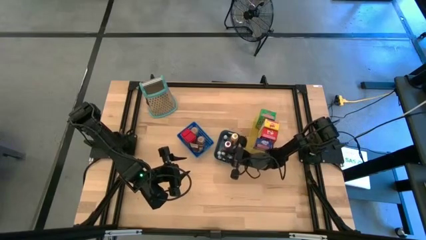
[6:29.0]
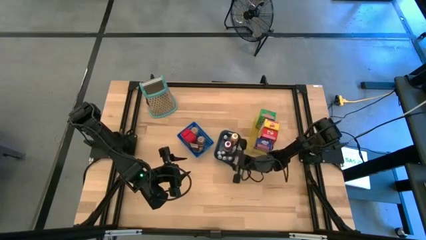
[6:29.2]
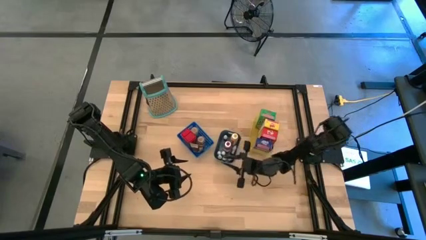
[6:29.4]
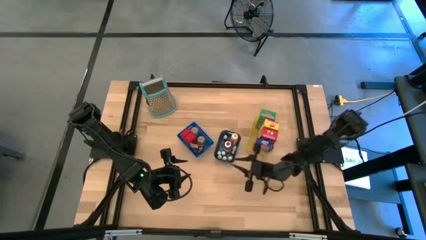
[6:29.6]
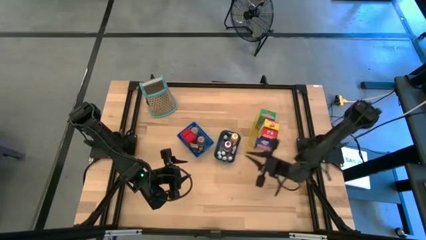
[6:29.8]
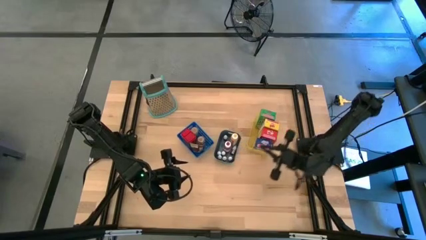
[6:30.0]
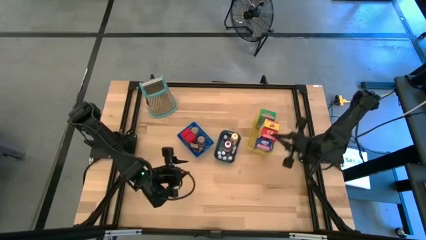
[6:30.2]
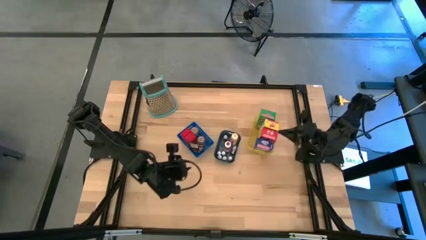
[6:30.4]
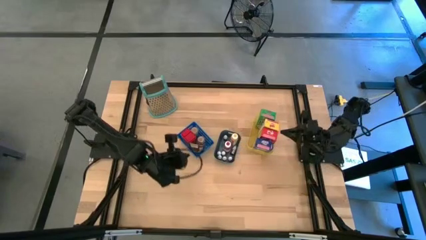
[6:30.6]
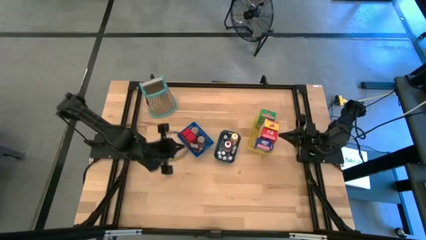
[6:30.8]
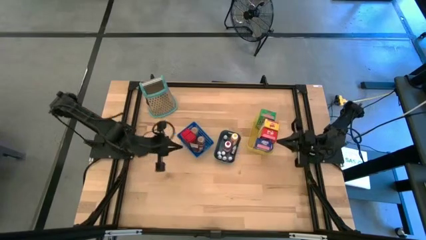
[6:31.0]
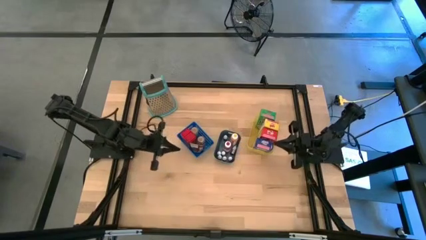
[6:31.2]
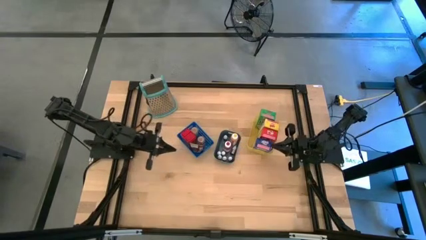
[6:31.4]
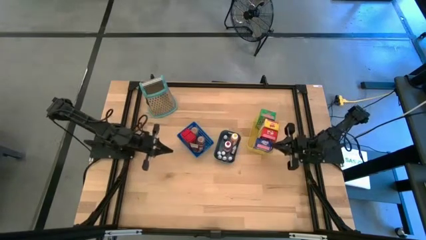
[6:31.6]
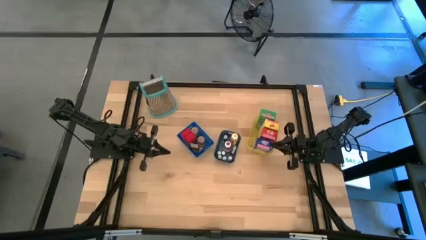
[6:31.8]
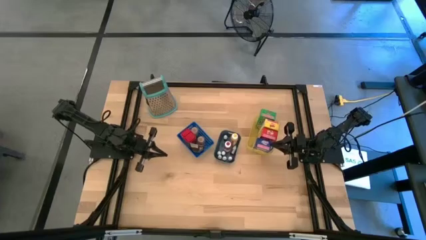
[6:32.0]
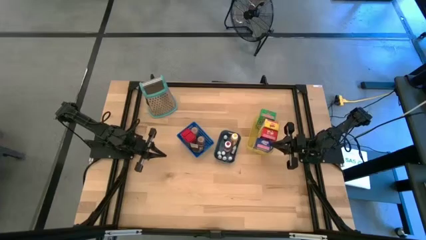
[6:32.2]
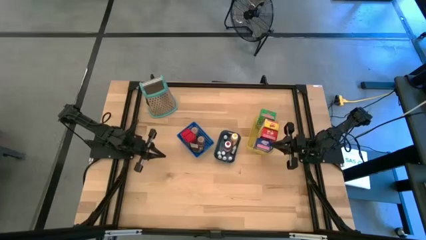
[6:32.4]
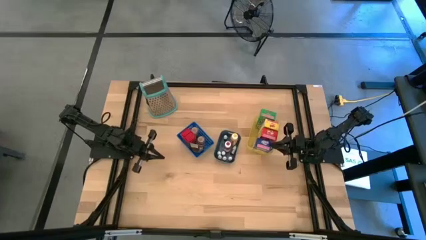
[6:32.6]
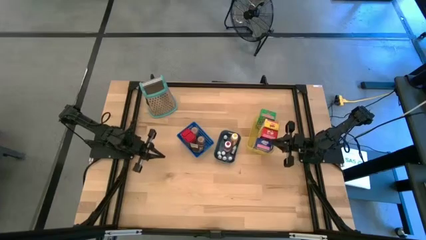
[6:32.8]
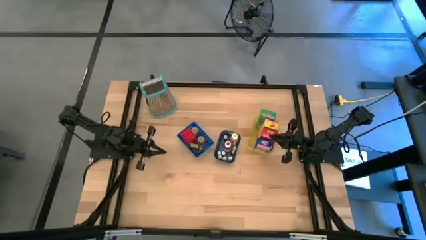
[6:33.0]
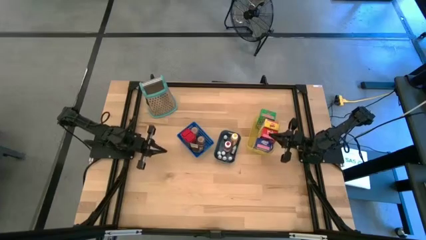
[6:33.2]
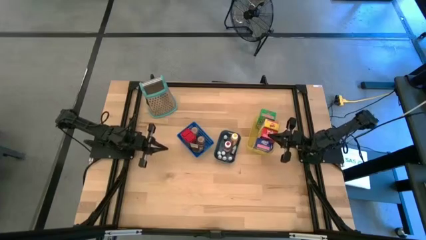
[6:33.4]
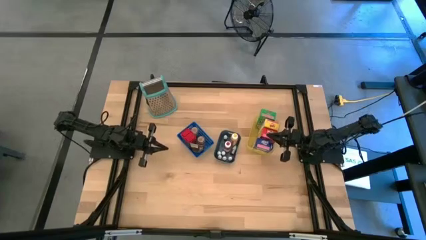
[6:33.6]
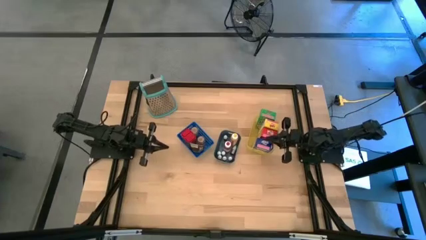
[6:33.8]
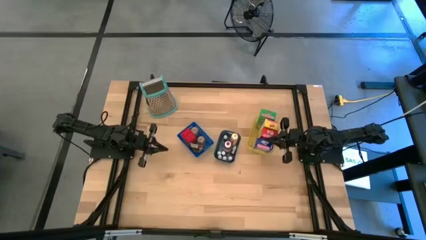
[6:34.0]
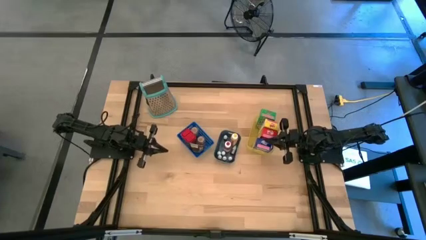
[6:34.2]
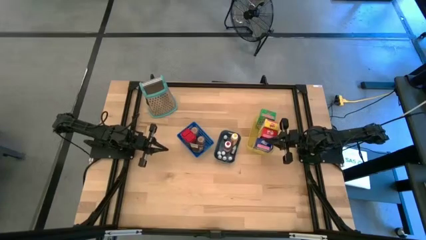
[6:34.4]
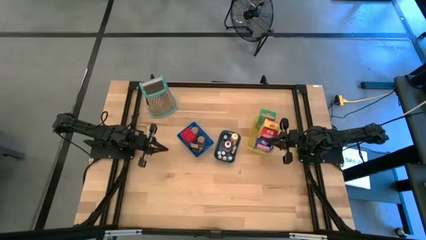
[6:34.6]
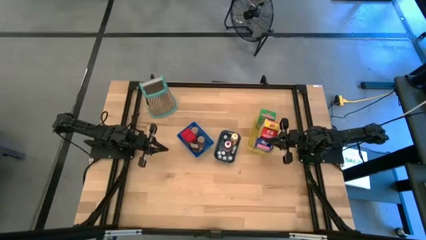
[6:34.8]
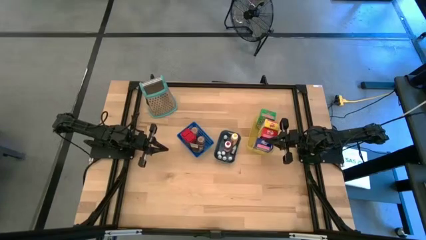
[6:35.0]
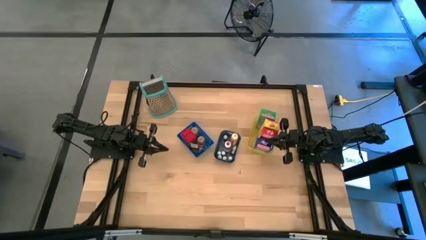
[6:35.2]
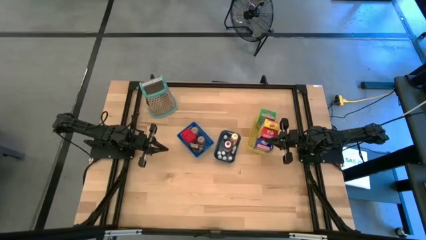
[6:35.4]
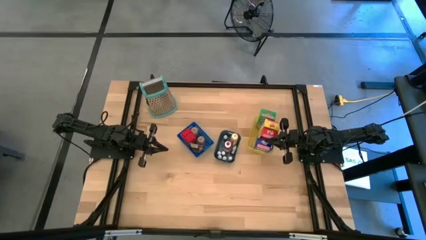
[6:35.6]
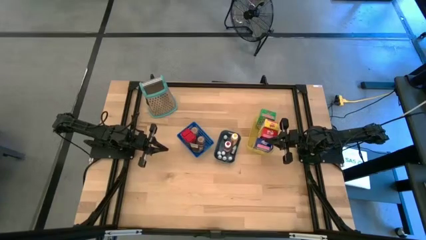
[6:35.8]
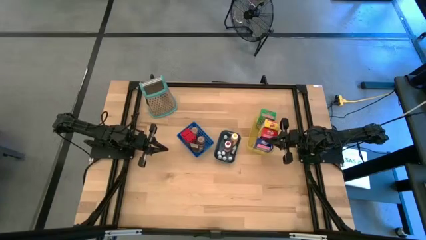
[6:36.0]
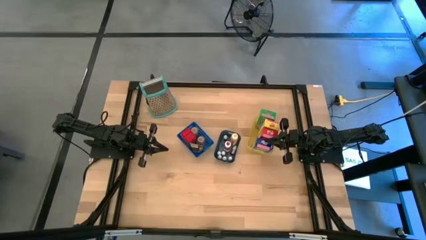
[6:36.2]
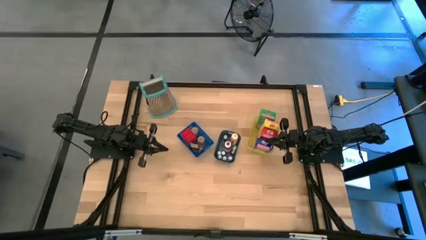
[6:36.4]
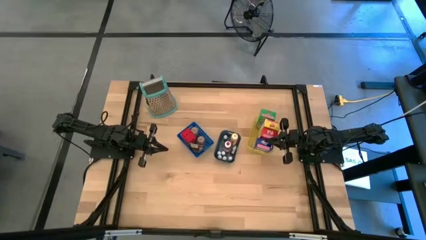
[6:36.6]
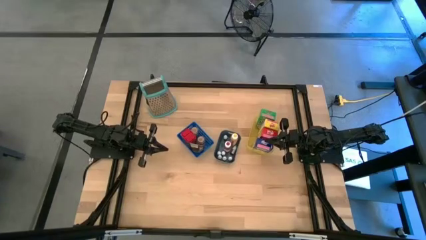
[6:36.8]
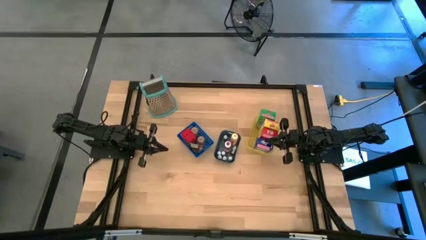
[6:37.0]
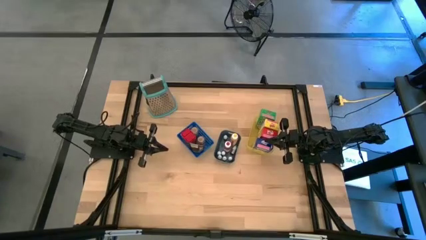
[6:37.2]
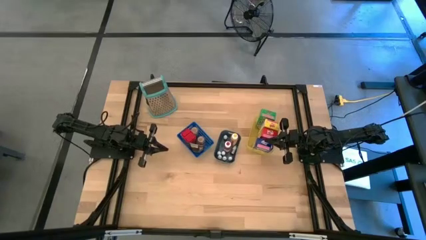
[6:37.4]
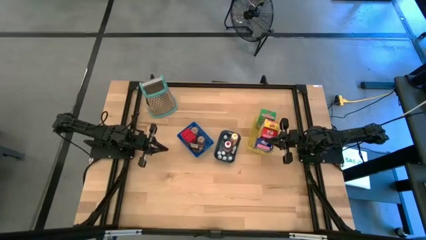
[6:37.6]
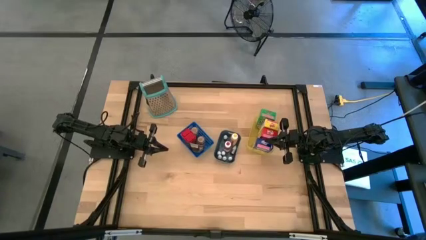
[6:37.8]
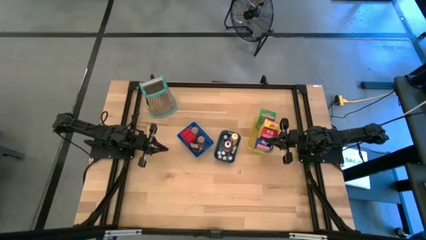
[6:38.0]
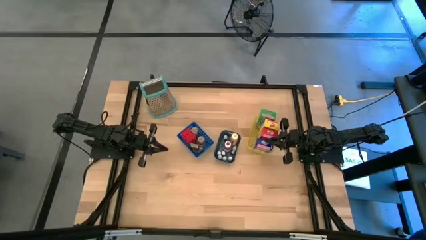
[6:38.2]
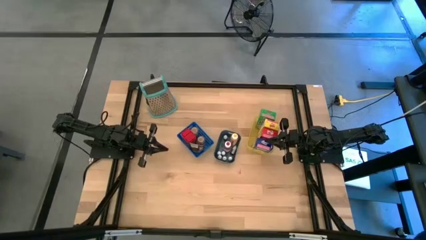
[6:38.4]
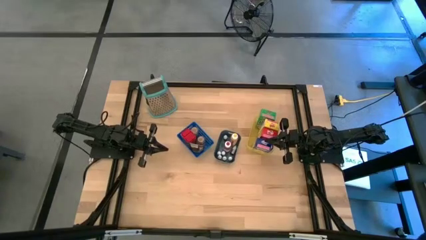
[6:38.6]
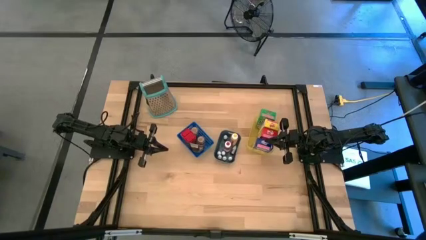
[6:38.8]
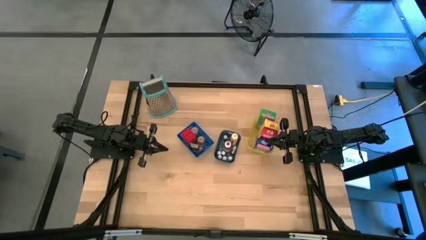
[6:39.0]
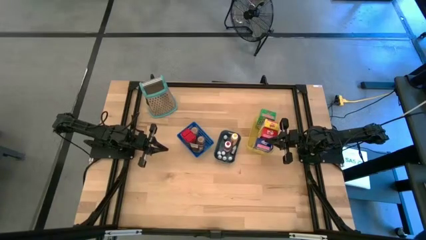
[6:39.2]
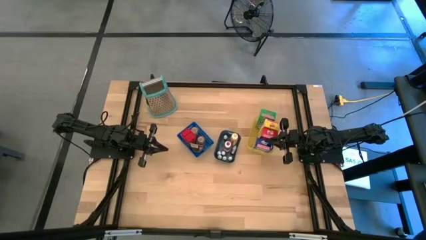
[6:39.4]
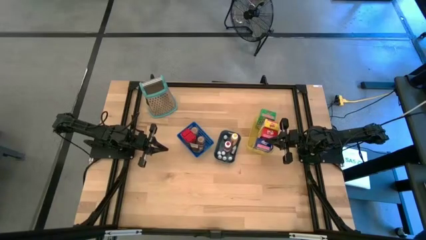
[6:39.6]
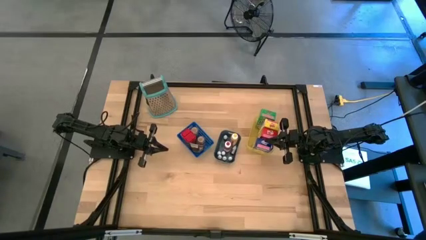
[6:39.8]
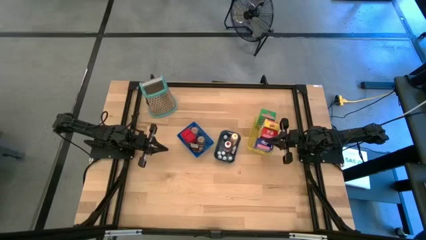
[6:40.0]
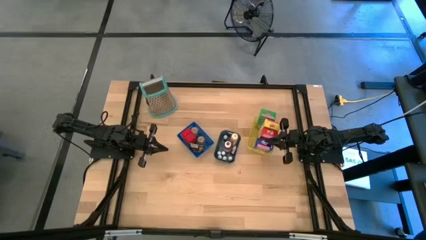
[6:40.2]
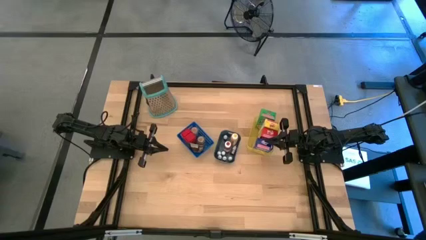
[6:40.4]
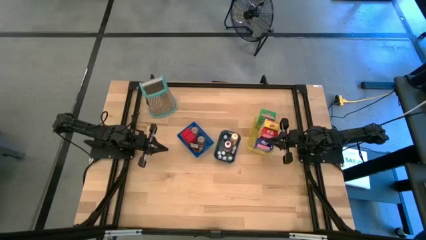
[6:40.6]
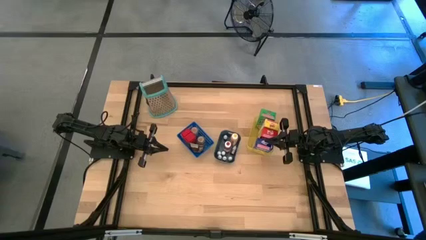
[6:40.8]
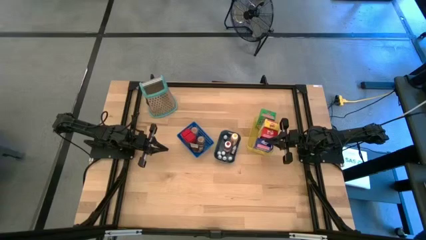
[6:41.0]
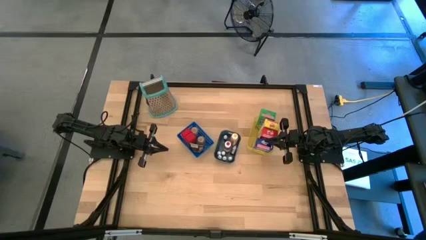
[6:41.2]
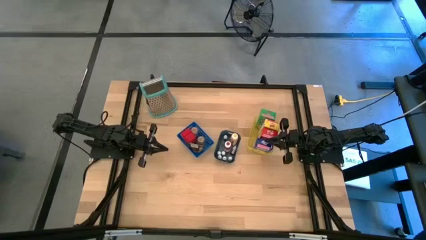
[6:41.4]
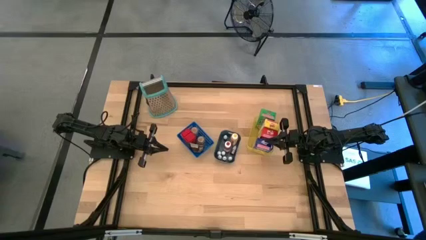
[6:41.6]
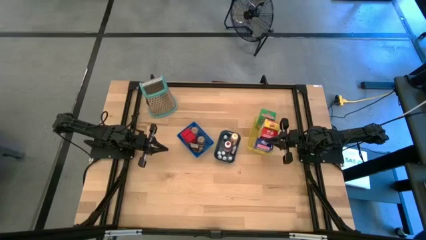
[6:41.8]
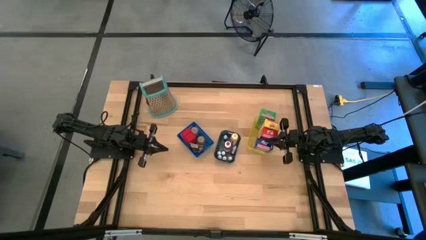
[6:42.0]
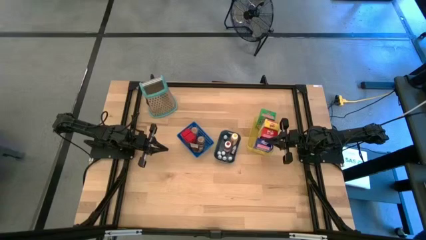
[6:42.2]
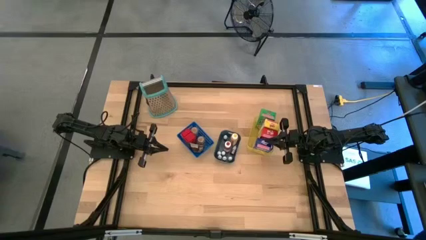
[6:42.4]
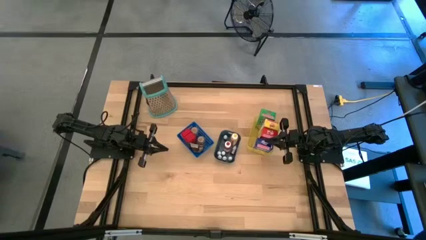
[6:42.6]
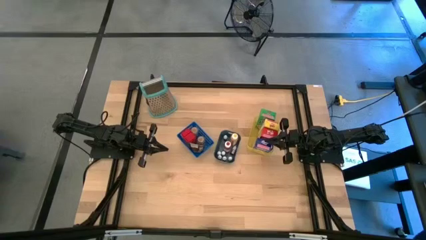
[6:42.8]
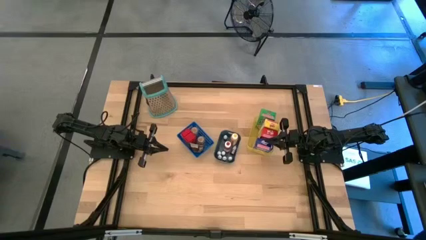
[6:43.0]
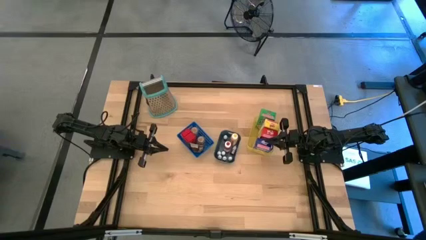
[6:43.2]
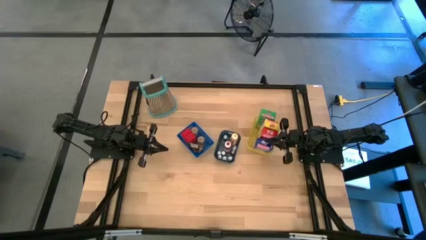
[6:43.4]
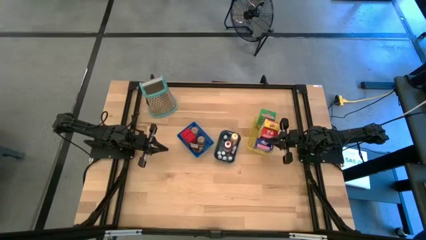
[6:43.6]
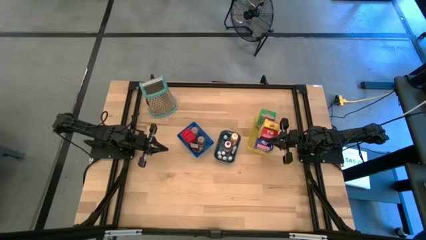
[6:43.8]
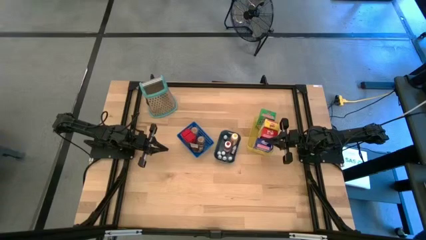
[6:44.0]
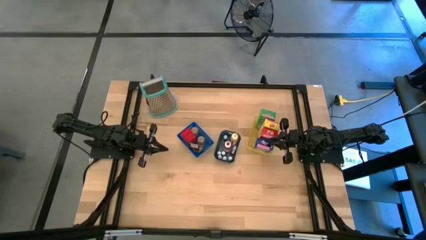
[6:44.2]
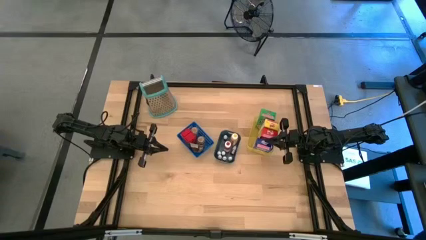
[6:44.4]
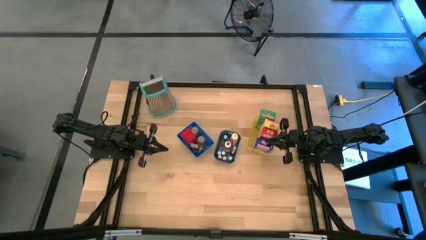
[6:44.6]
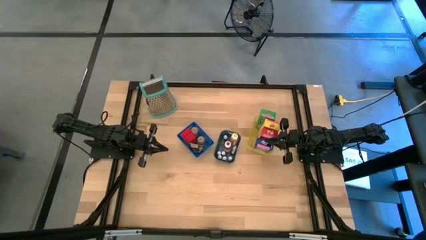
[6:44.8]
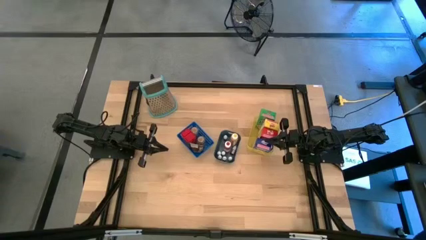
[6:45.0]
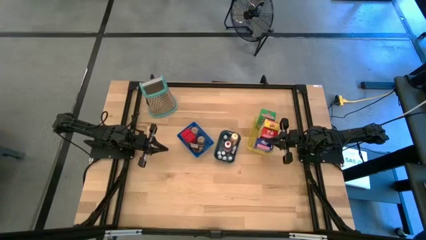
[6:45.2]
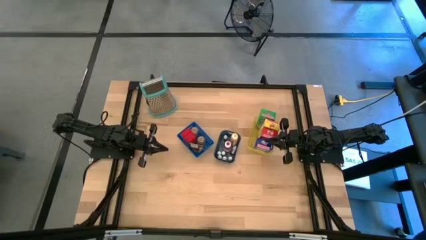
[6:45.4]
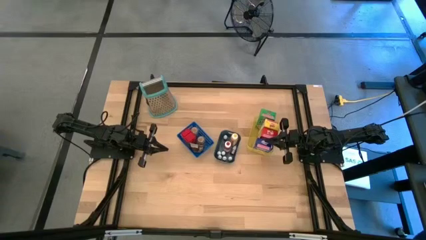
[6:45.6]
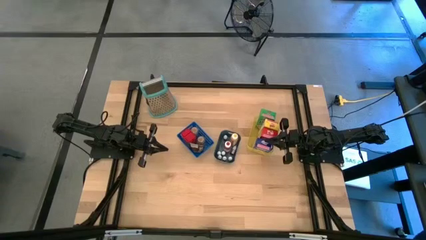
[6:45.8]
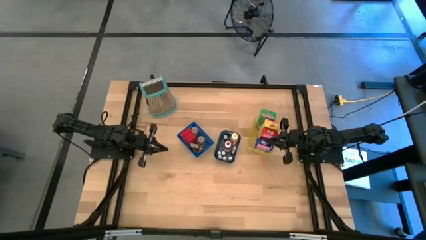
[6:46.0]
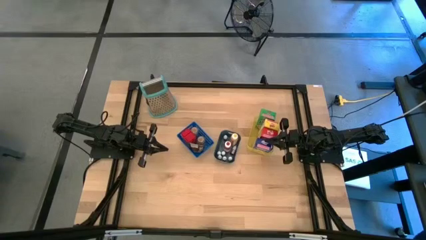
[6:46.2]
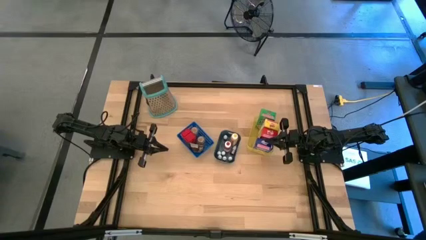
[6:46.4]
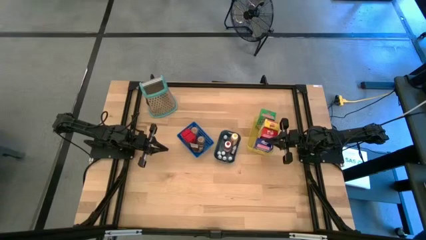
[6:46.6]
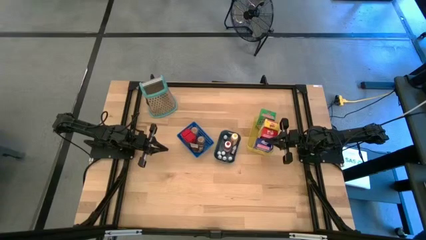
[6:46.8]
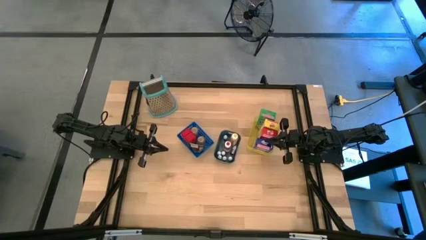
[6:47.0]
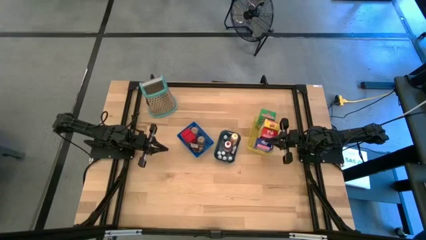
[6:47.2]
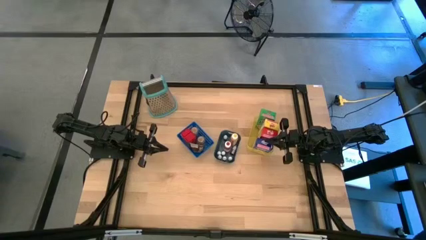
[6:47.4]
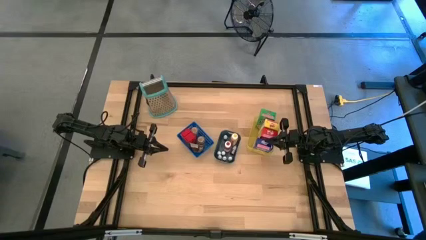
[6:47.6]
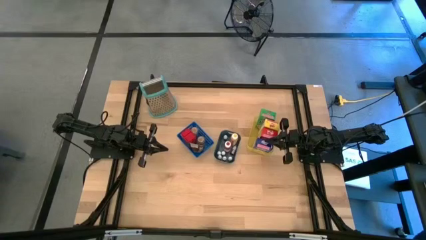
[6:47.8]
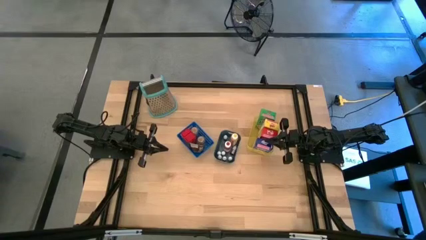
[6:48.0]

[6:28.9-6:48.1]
Task: Pick & Place Kitchen Items
Return to Home Position
